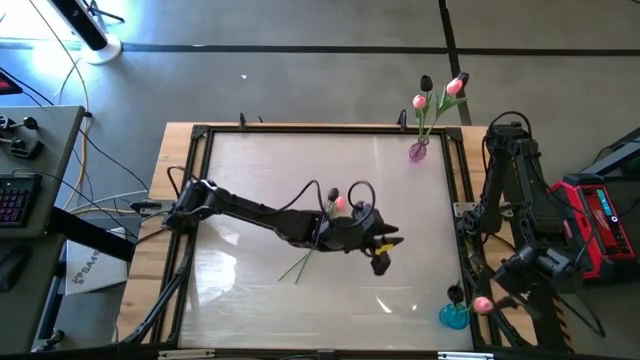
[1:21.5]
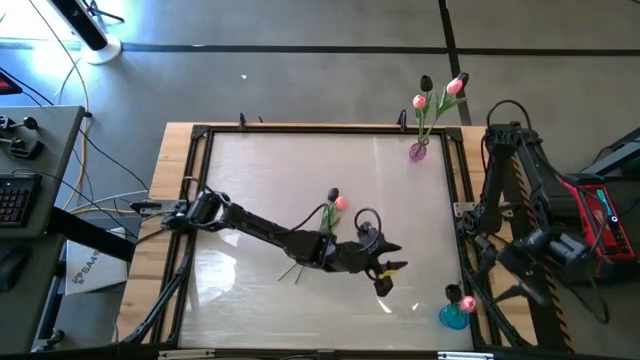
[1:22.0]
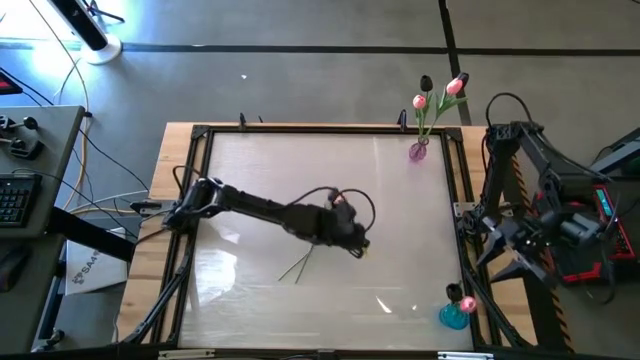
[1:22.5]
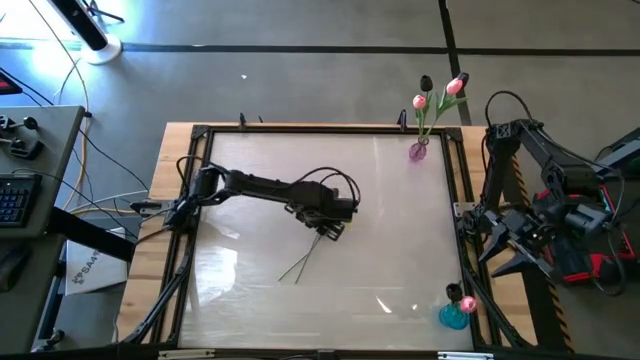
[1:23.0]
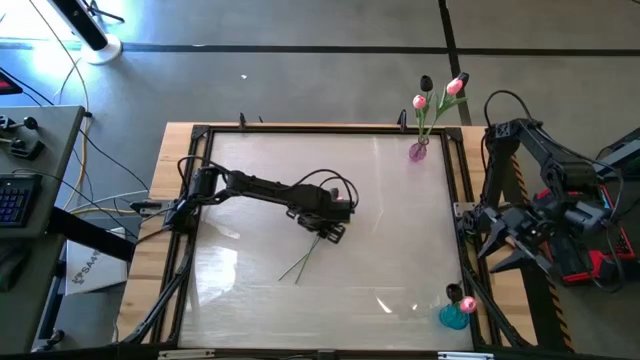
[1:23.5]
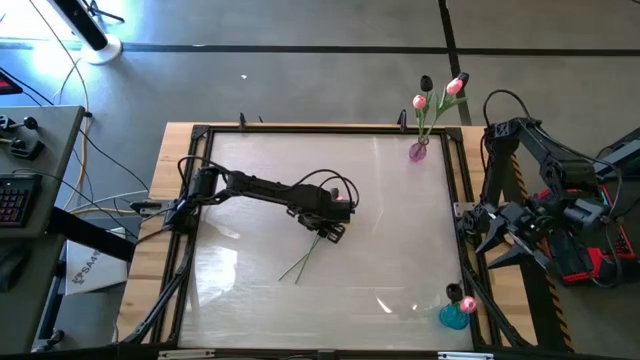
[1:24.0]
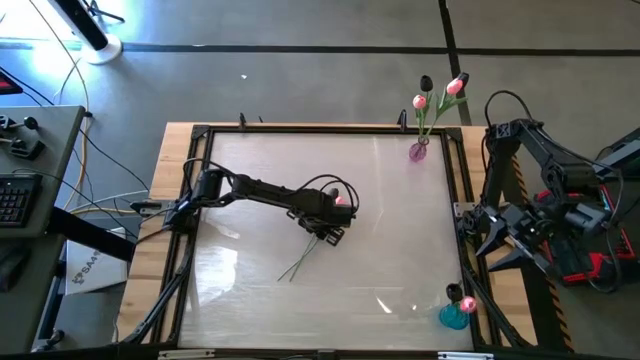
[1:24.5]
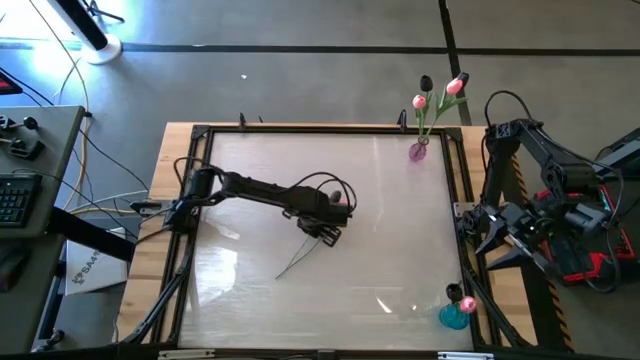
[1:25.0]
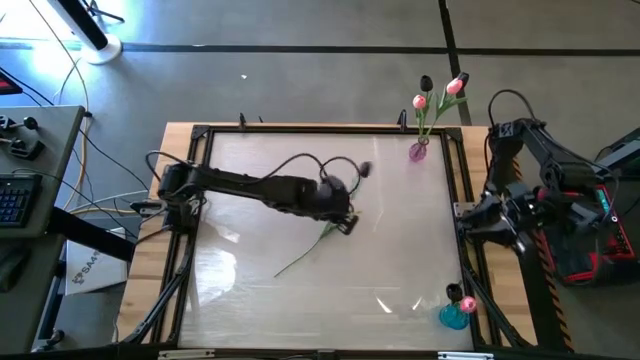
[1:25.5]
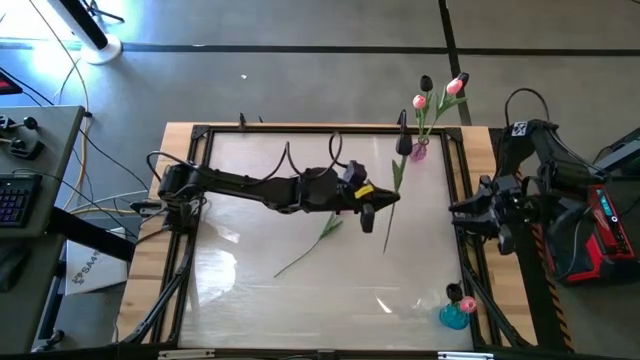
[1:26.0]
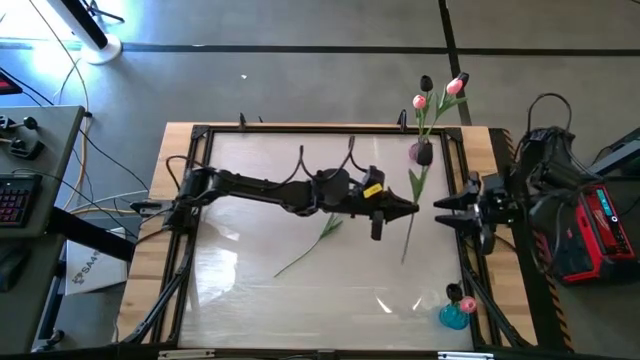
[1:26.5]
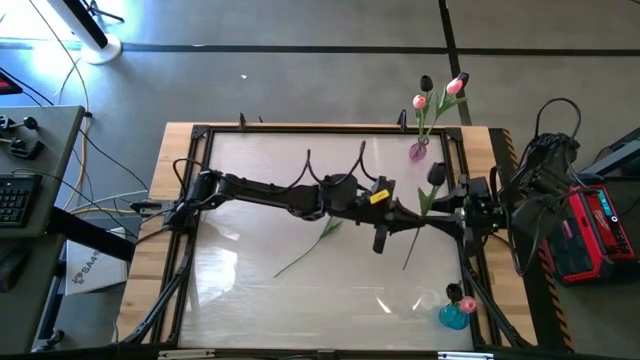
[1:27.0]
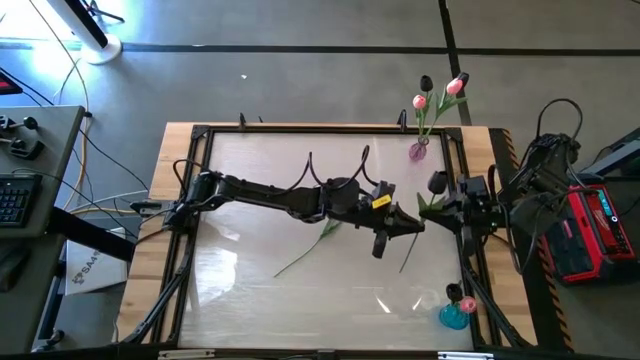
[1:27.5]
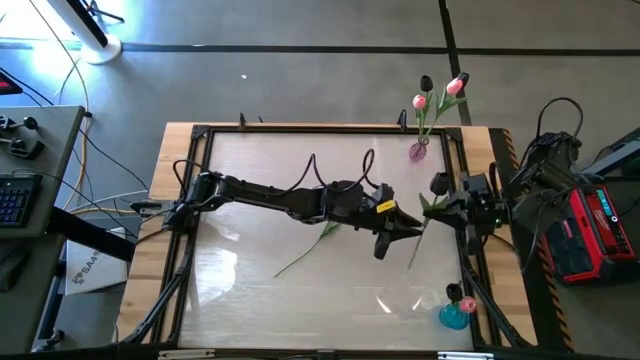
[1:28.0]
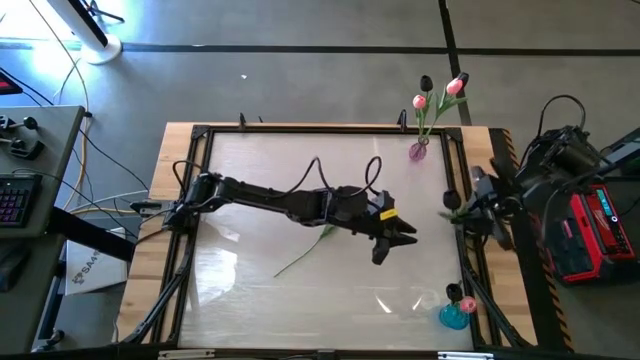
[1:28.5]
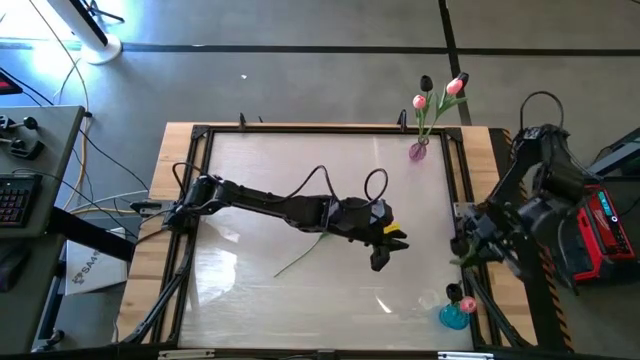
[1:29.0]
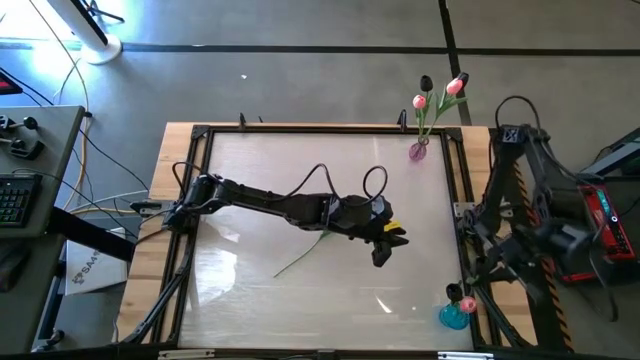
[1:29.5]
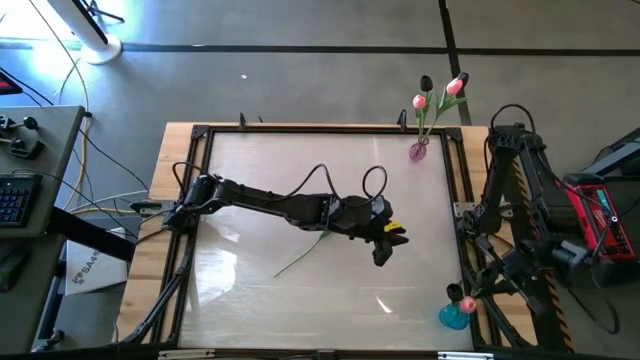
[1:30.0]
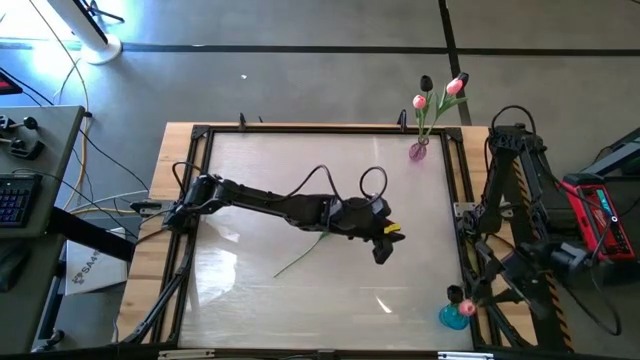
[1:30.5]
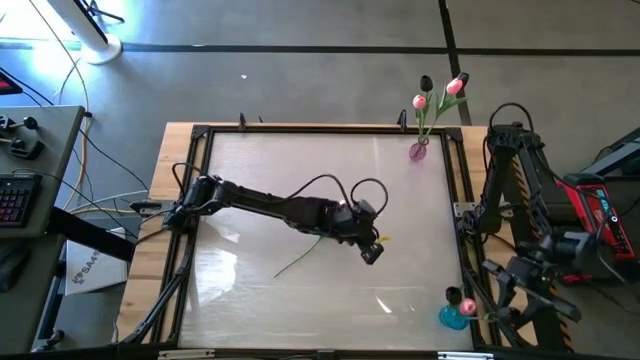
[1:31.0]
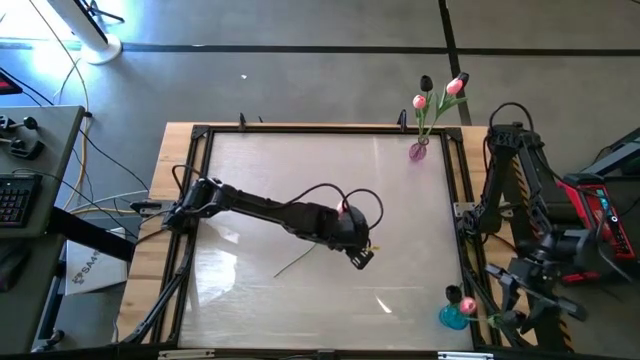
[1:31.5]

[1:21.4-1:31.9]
Task: Sort flowers into vase by color
Put the black flower into the blue vase

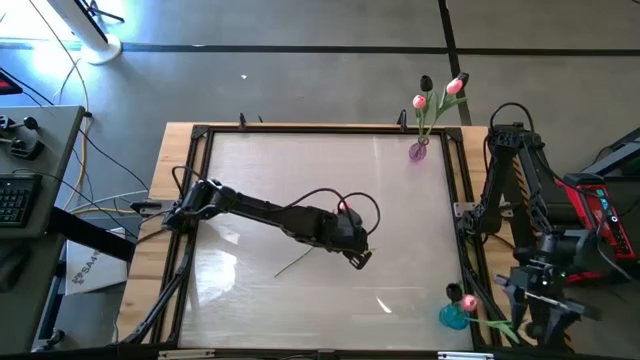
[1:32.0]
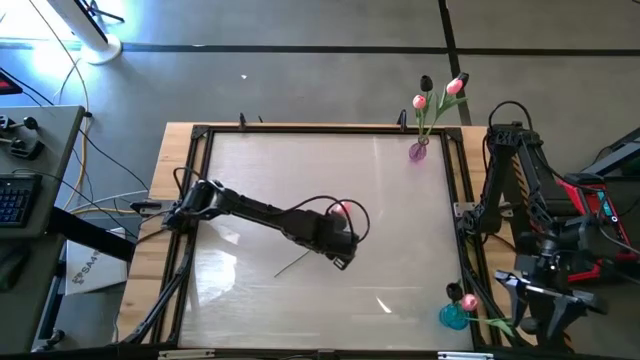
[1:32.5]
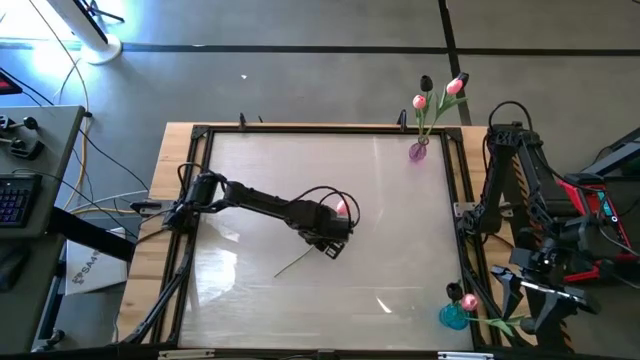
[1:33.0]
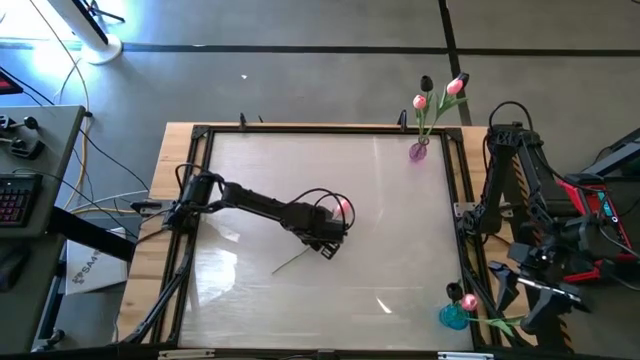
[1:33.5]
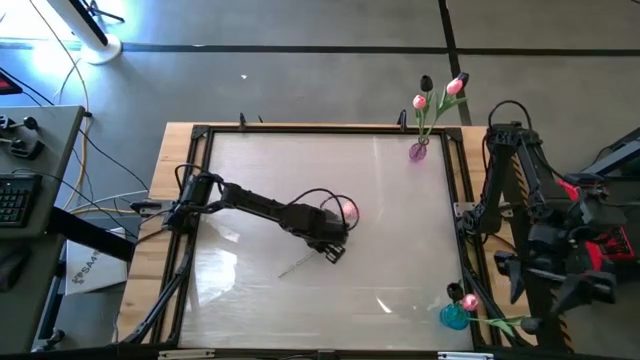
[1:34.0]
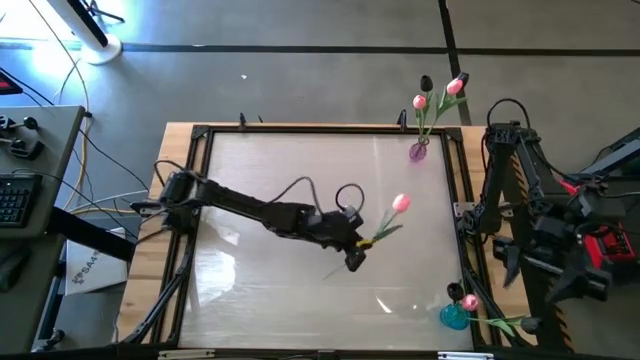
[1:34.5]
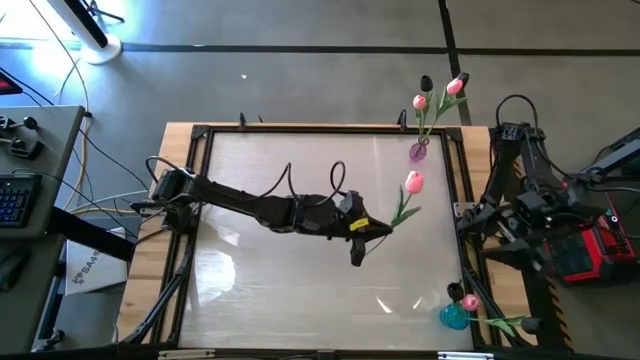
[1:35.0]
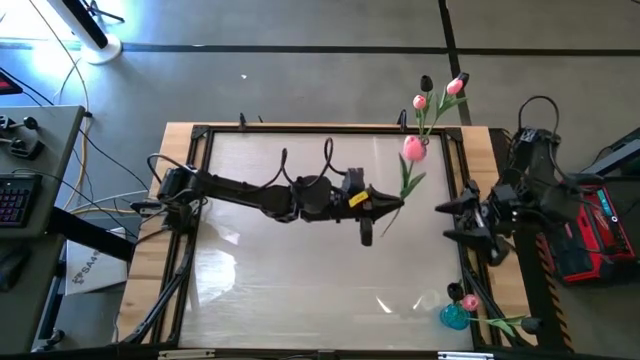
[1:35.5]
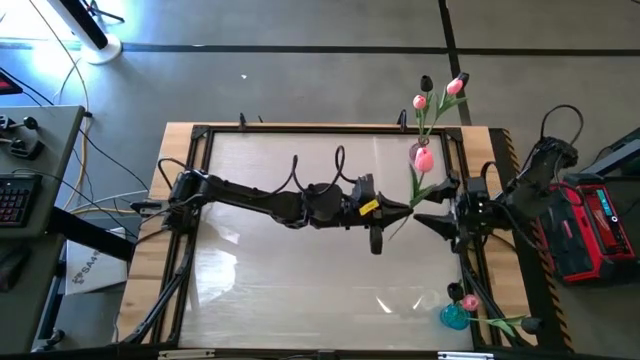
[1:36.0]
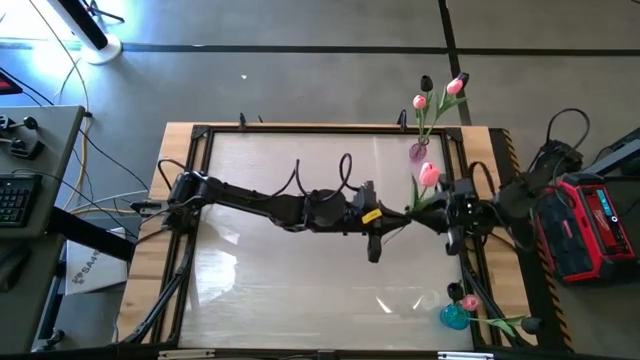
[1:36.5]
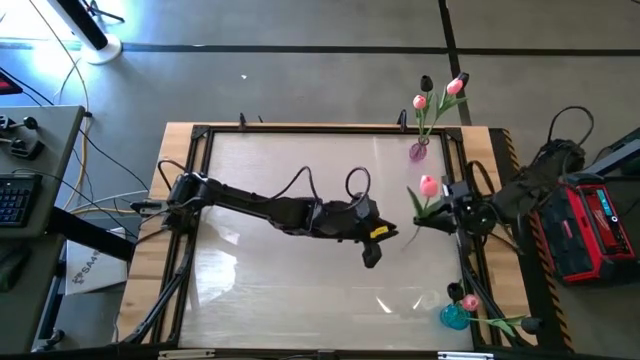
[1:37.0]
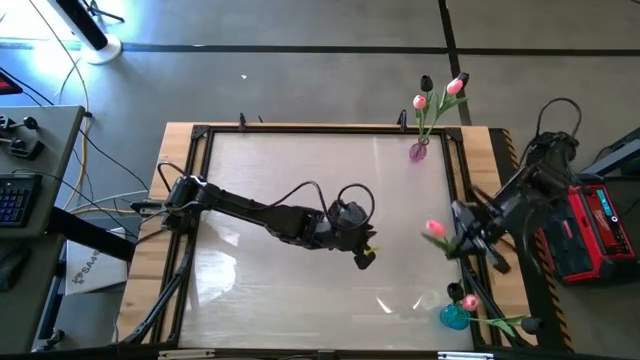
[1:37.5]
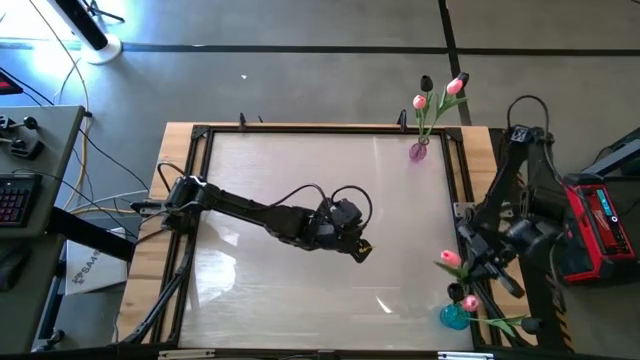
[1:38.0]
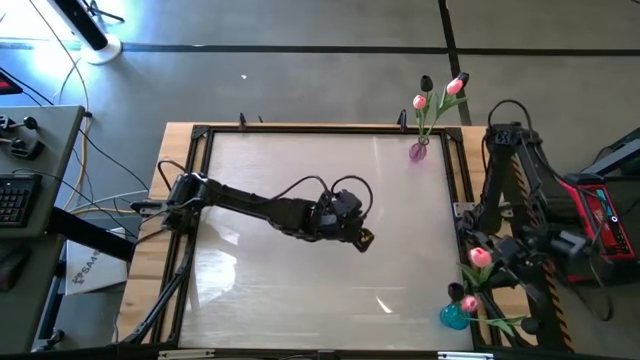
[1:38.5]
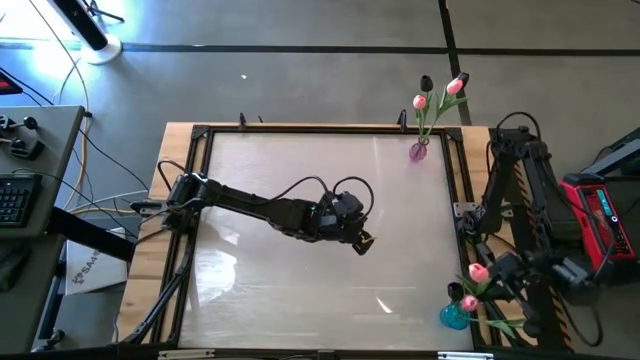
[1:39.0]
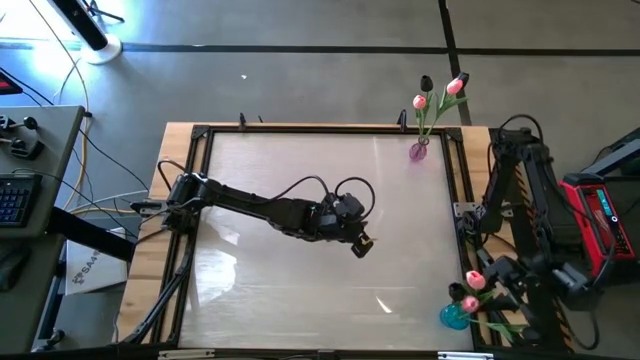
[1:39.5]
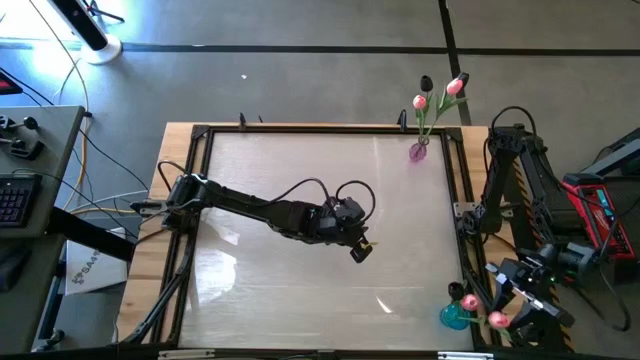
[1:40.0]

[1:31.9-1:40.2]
Put the pink flower into the blue vase

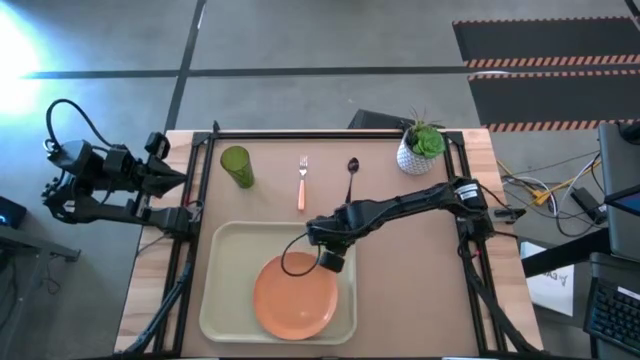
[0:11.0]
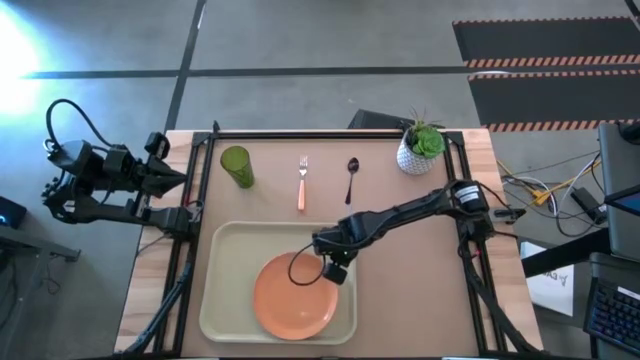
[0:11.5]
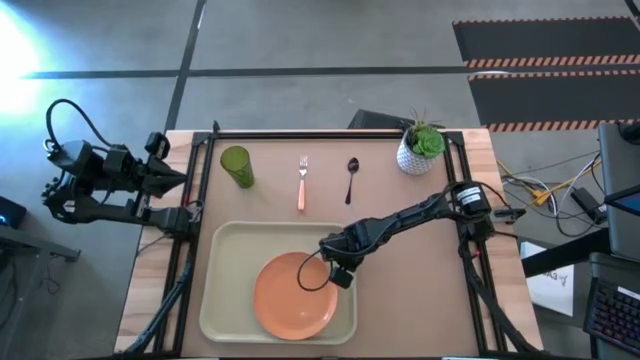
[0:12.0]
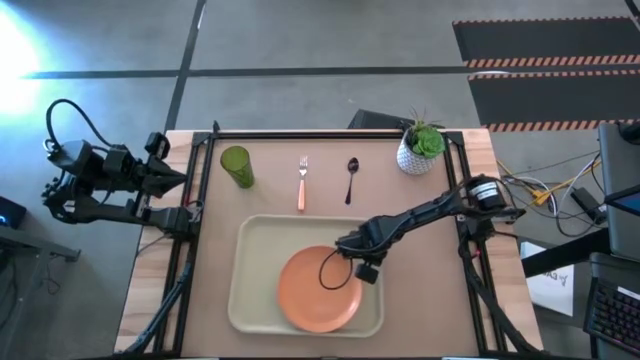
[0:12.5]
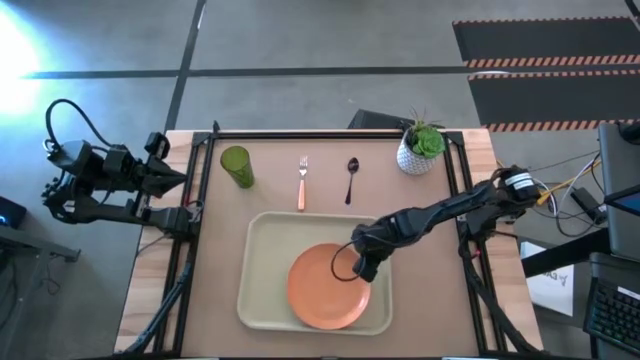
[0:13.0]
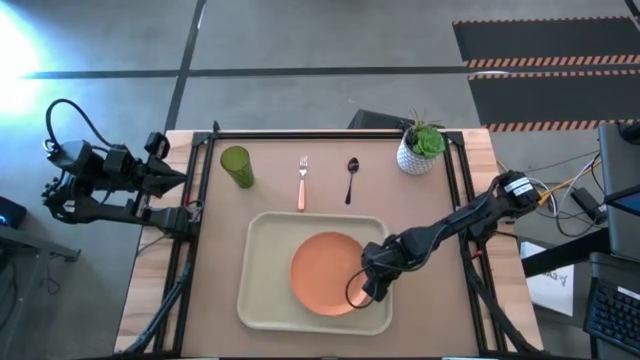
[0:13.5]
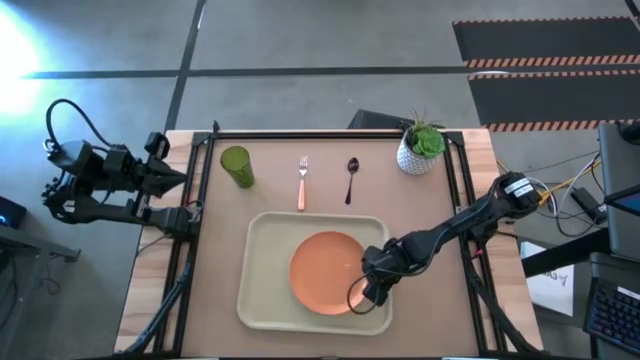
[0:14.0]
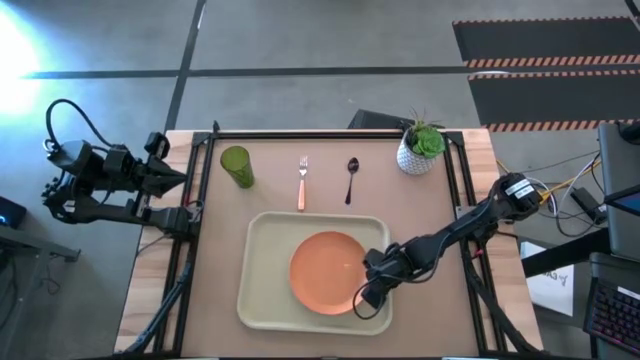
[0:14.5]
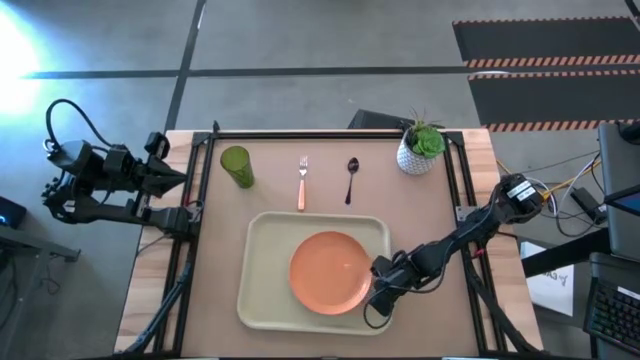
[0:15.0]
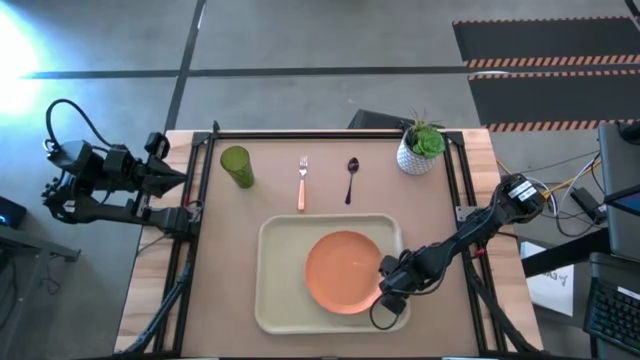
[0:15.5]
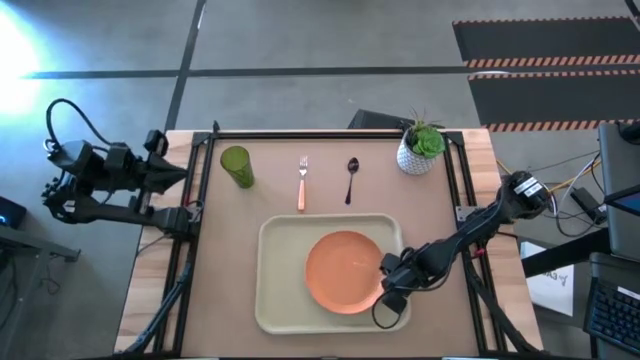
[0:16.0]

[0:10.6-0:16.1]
Task: Pick and place plate/cup/fork/spoon on tray
Adjust the gray tray
